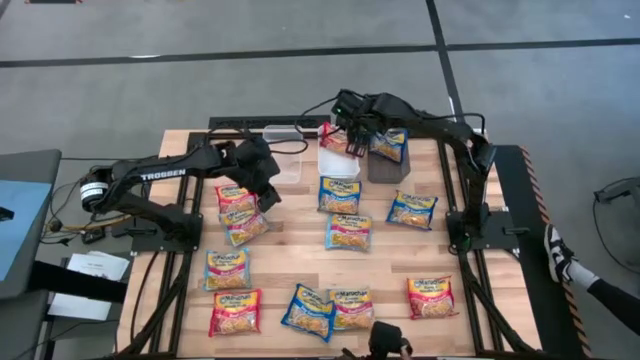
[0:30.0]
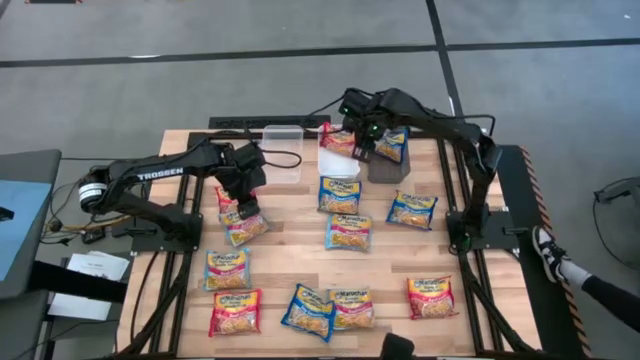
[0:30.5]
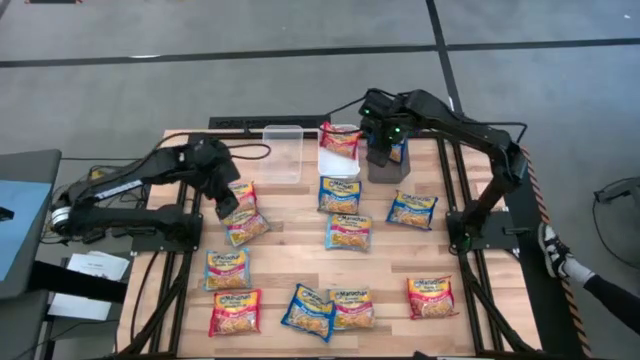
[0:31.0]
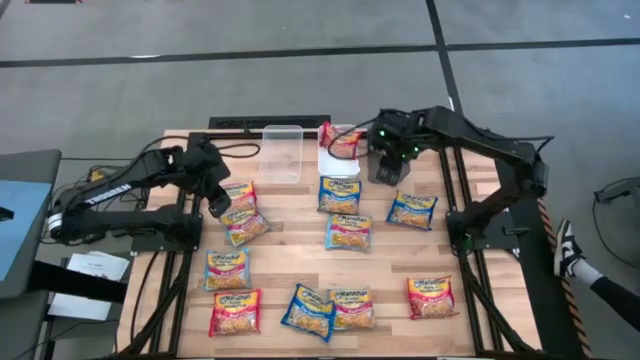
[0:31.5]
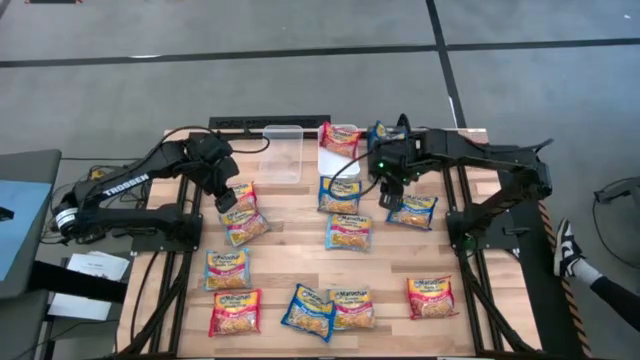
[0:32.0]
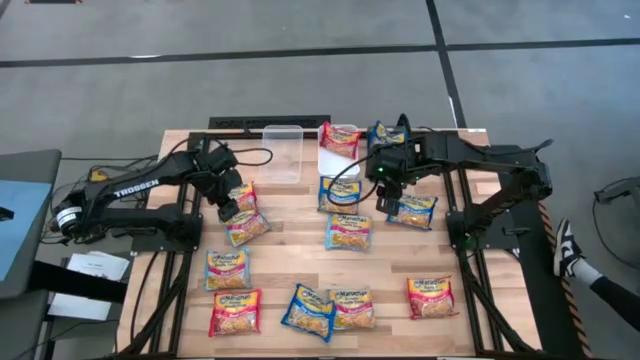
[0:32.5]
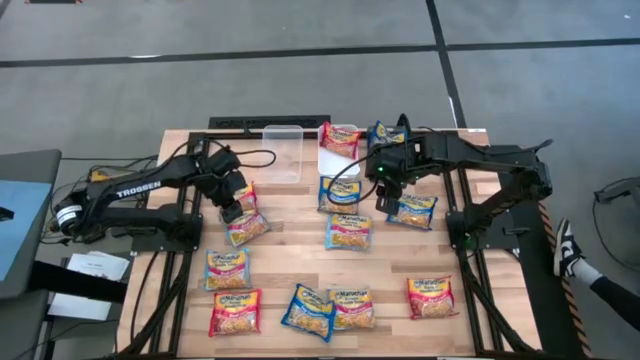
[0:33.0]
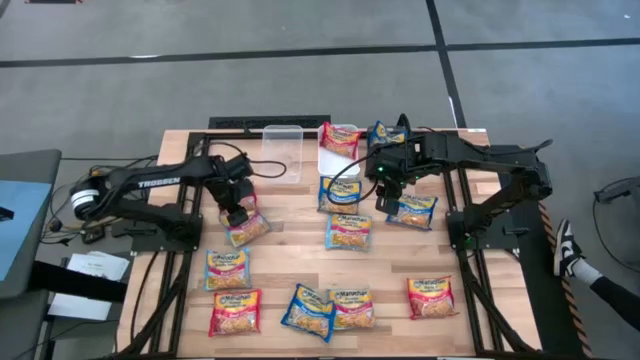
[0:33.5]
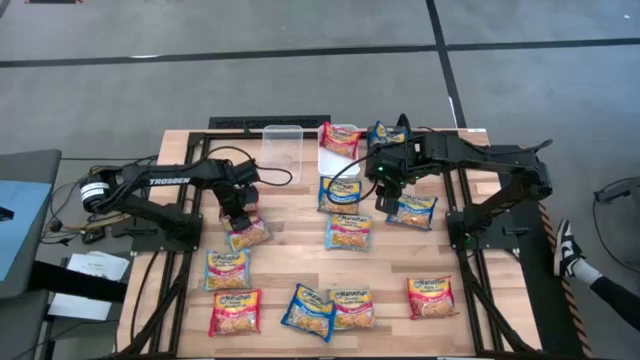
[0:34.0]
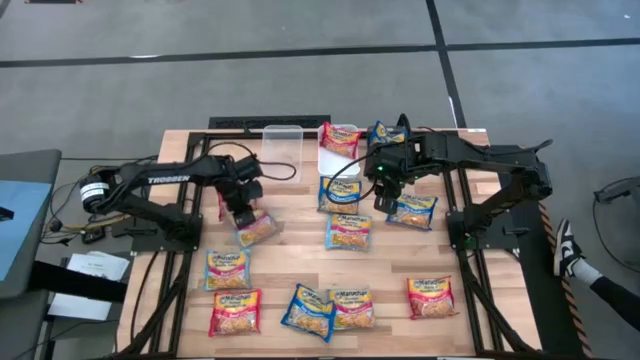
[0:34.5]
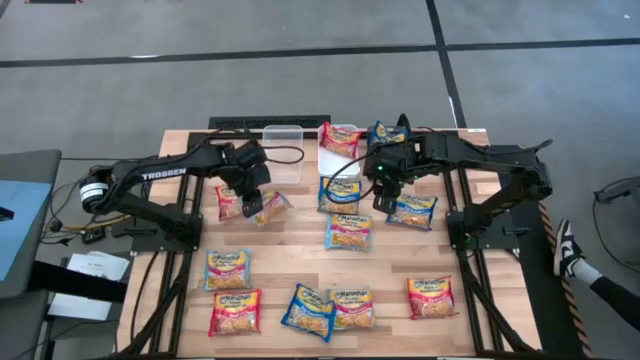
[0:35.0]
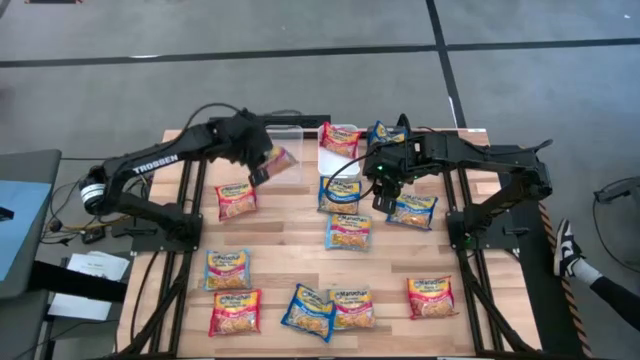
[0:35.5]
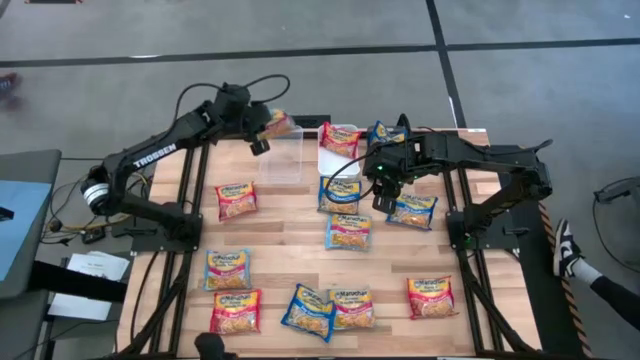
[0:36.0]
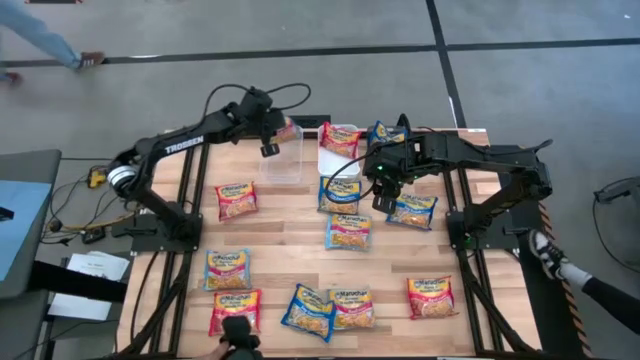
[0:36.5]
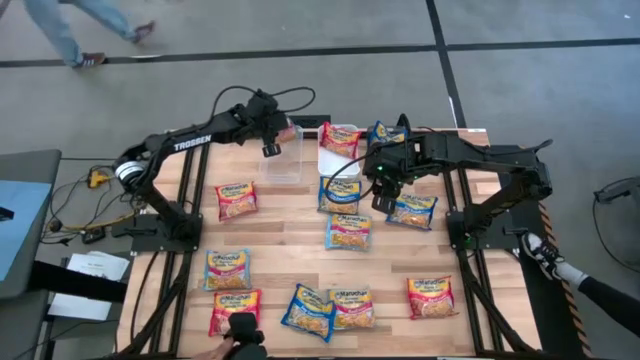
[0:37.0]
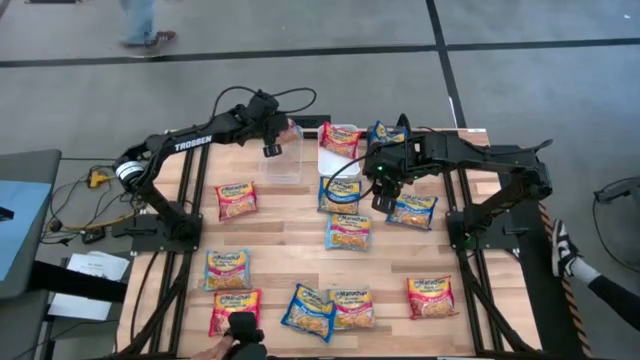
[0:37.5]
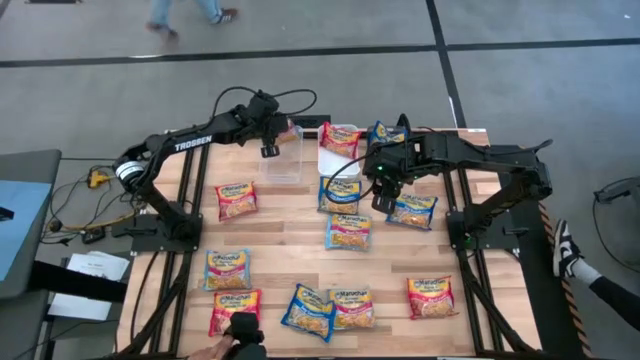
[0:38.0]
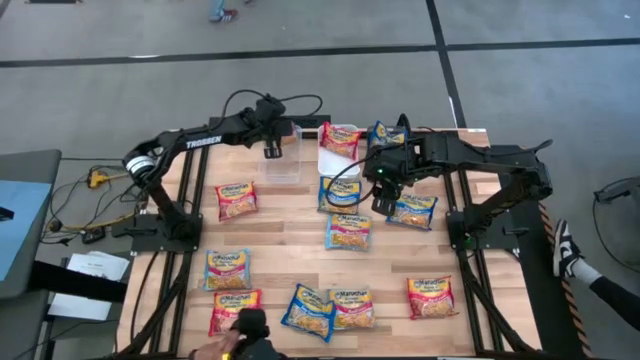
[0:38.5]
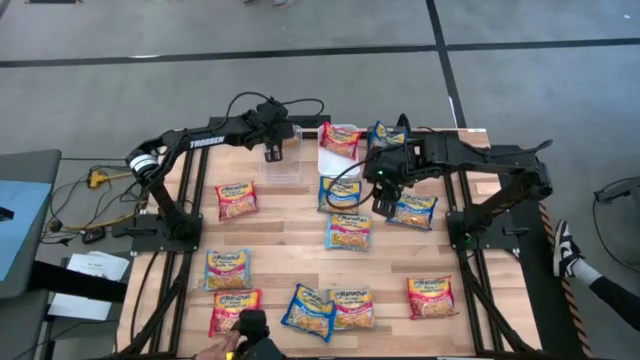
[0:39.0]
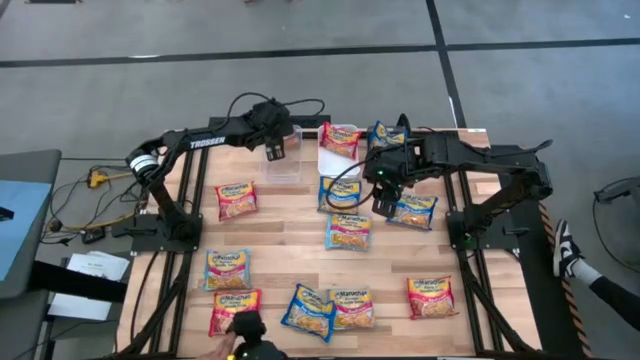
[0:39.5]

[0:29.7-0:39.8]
Task: Sort Maruchan noodles
Put the light blue noodle pack into the transparent bin

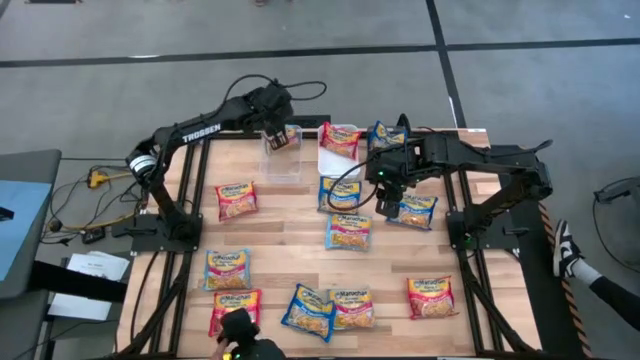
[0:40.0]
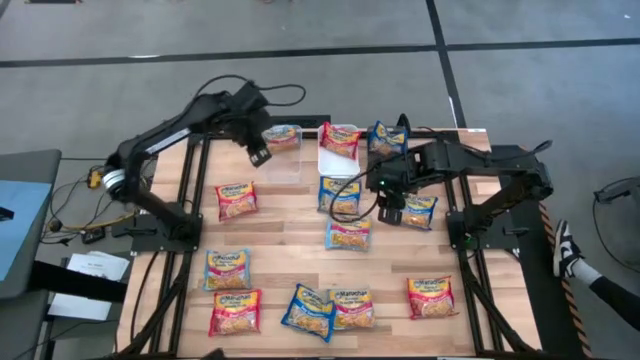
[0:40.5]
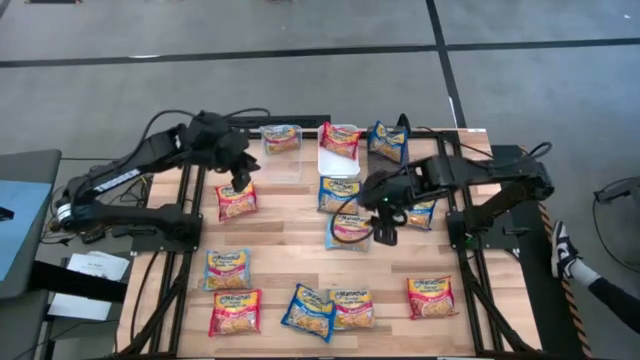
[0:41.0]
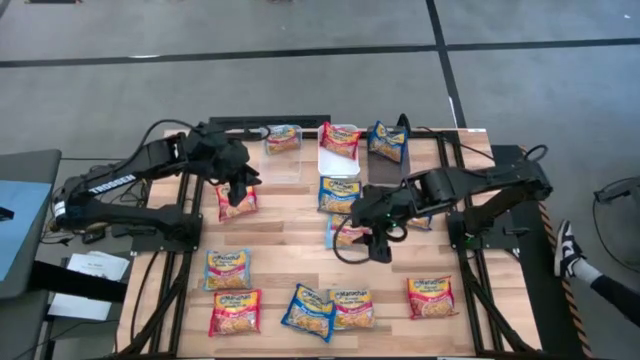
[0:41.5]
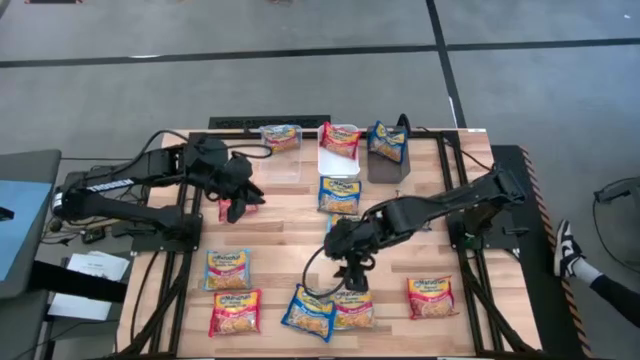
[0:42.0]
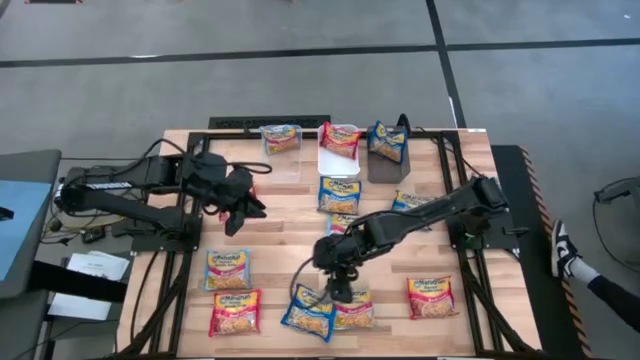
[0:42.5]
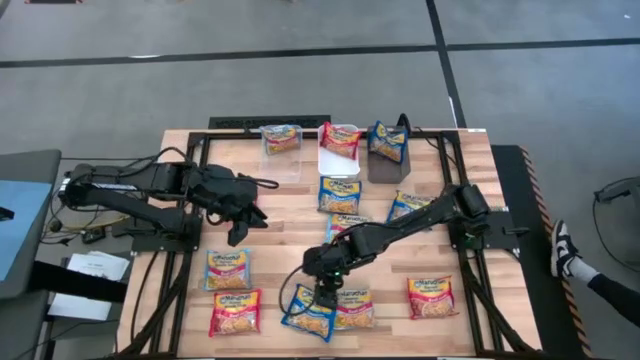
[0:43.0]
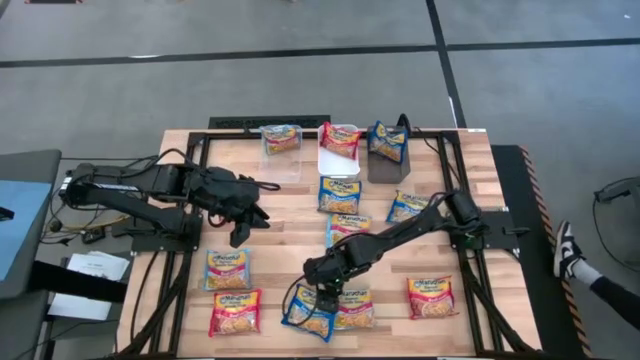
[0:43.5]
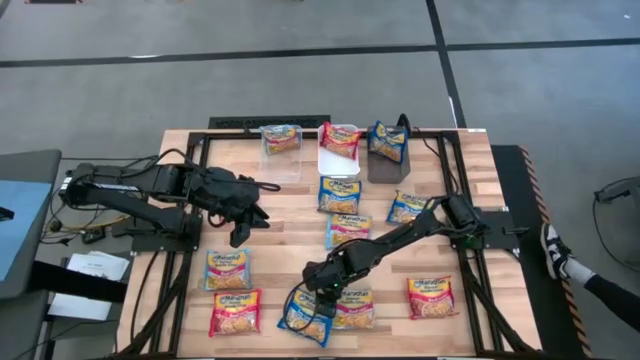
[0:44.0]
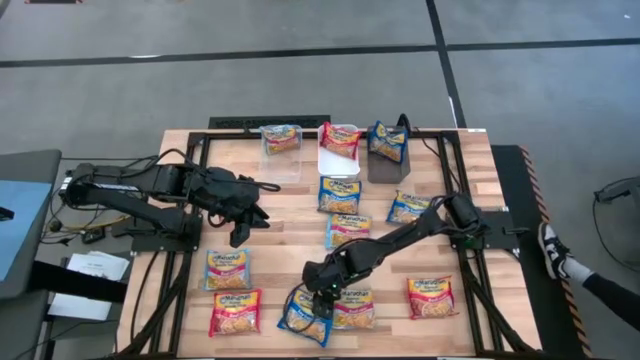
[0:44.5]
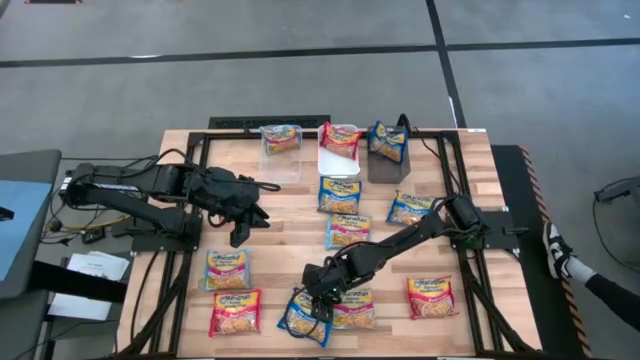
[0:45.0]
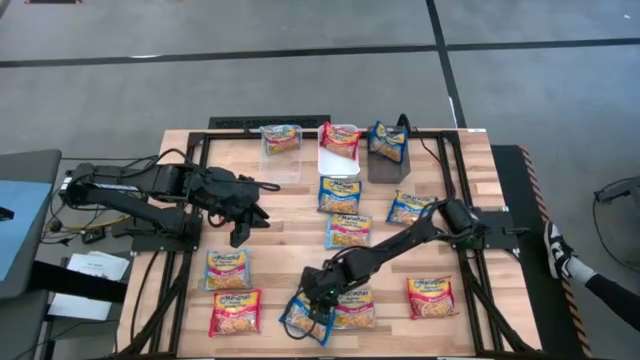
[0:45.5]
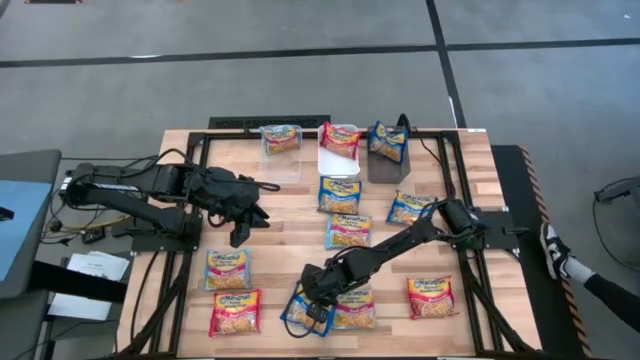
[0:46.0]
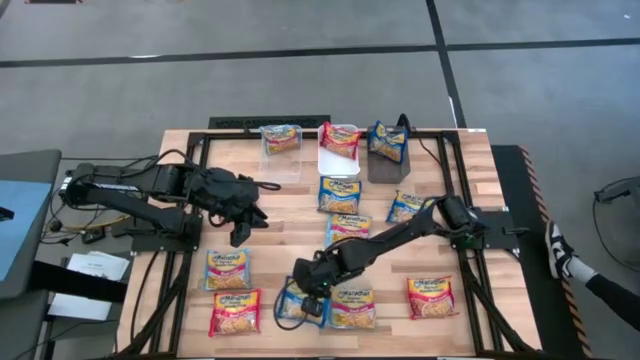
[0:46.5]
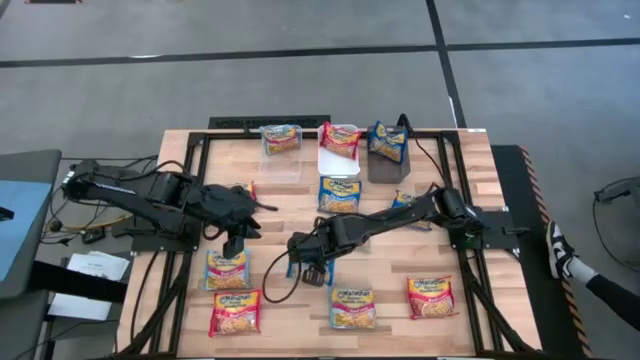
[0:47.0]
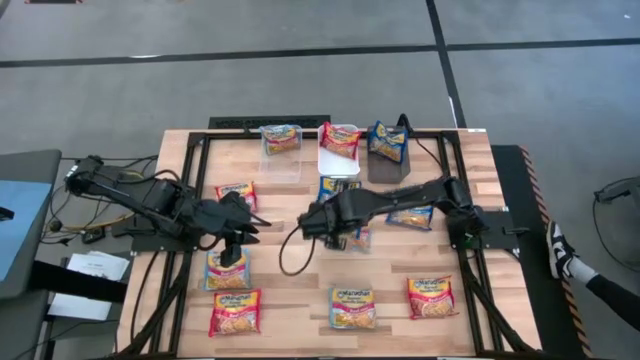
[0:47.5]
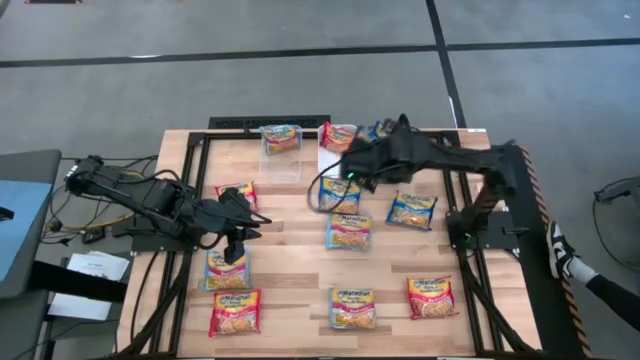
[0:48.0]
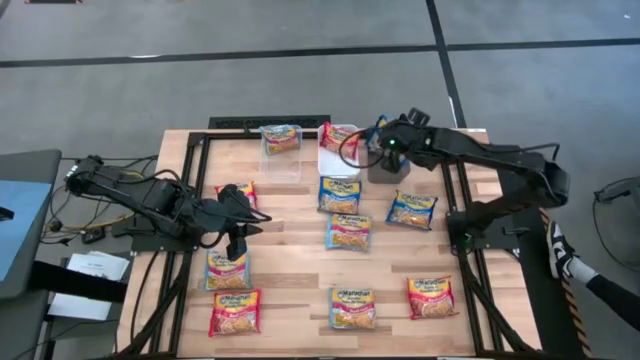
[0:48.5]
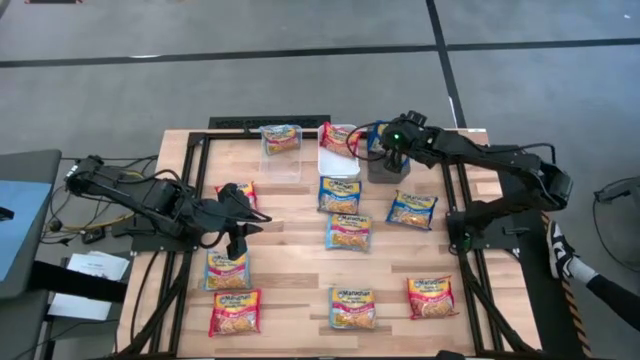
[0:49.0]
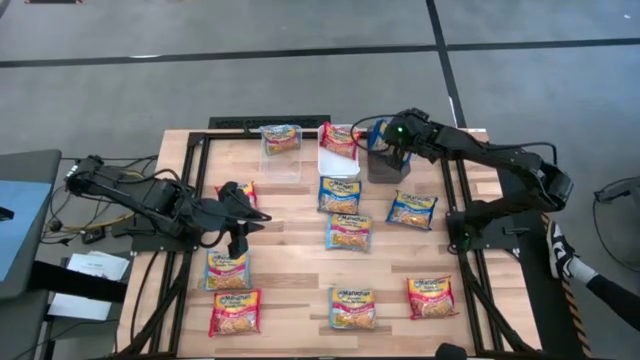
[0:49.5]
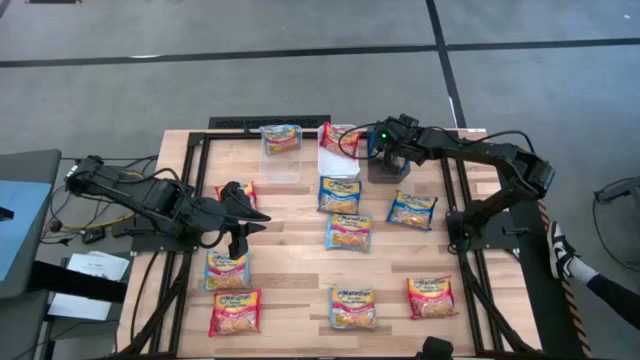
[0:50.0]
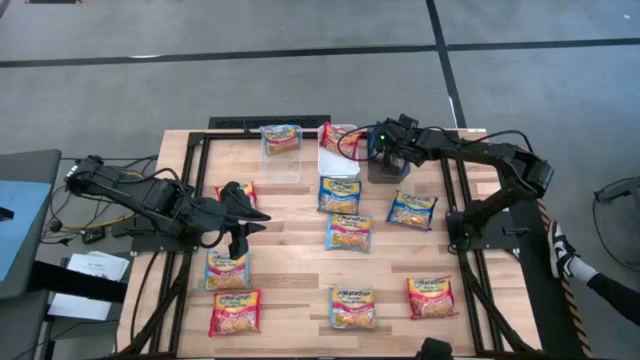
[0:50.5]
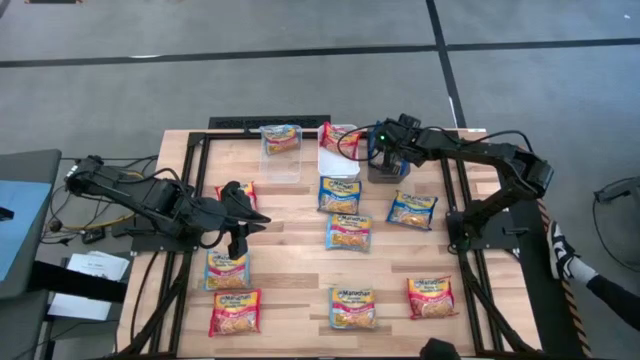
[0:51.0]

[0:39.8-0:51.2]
Put the blue noodle pack into the black bin
